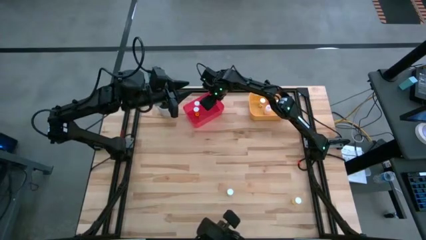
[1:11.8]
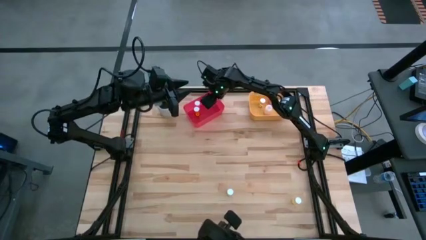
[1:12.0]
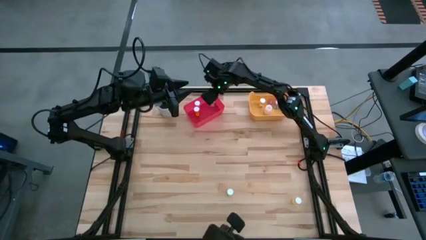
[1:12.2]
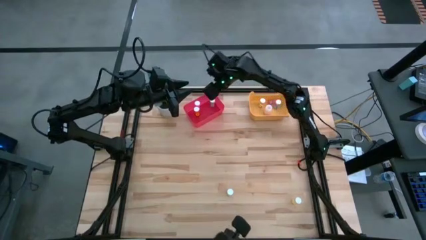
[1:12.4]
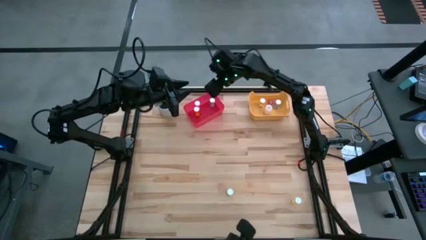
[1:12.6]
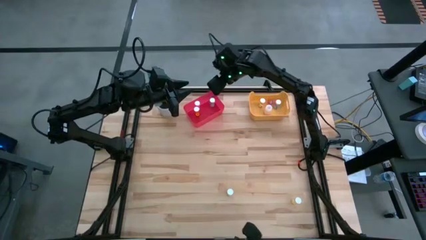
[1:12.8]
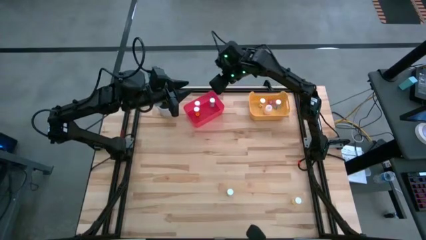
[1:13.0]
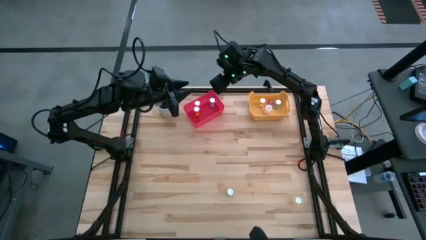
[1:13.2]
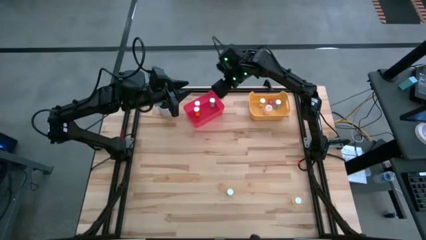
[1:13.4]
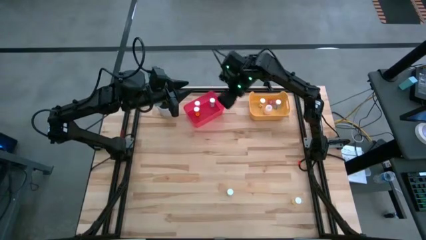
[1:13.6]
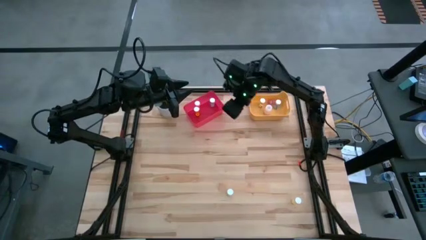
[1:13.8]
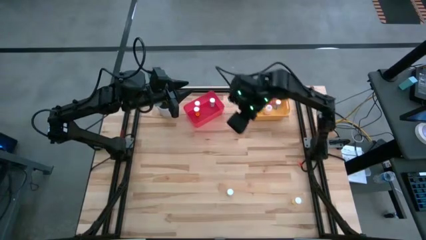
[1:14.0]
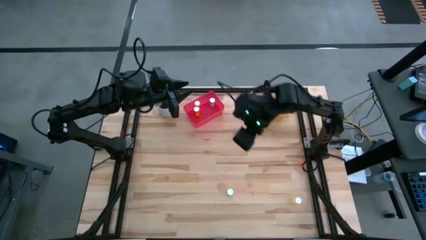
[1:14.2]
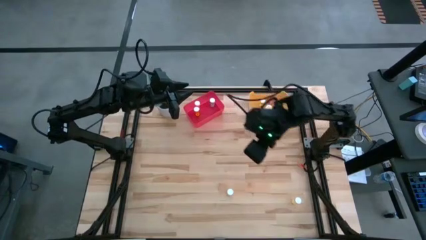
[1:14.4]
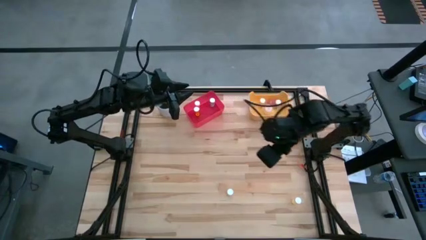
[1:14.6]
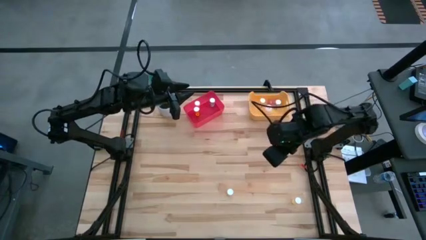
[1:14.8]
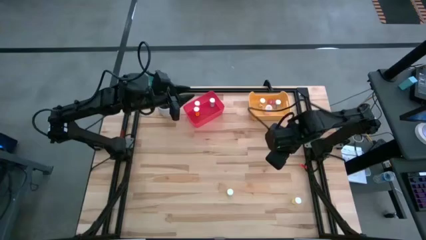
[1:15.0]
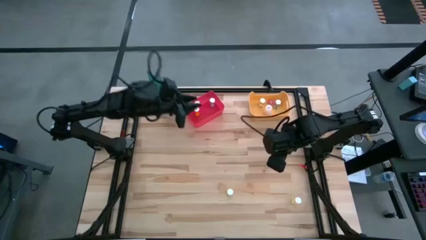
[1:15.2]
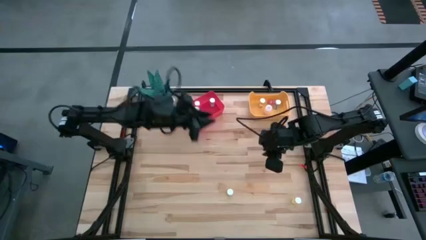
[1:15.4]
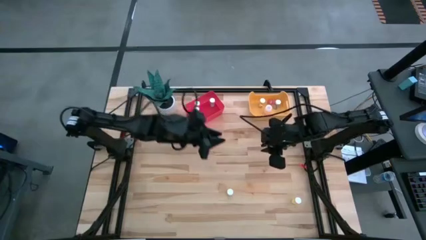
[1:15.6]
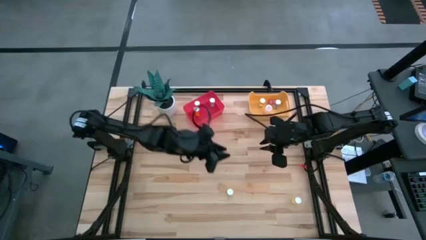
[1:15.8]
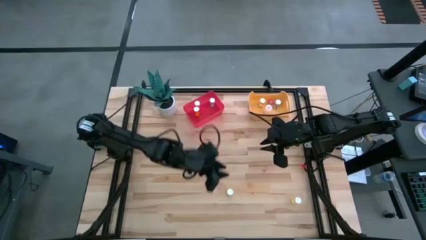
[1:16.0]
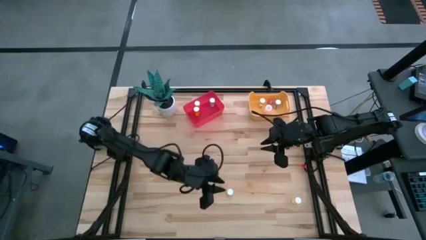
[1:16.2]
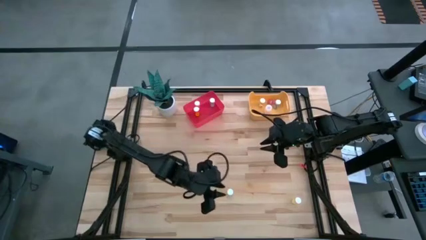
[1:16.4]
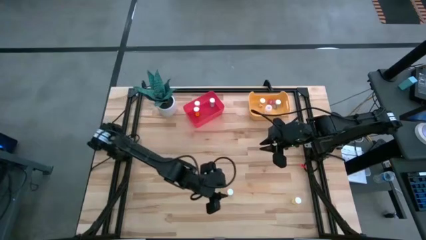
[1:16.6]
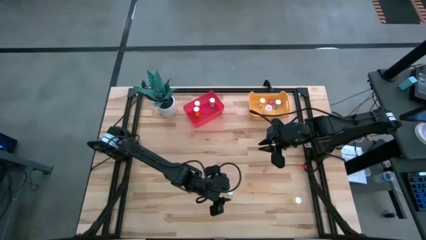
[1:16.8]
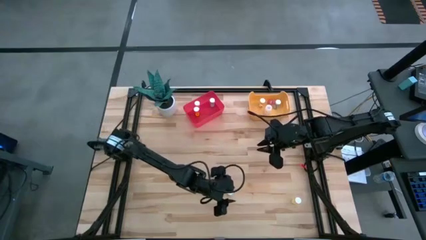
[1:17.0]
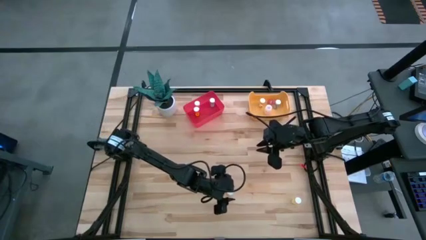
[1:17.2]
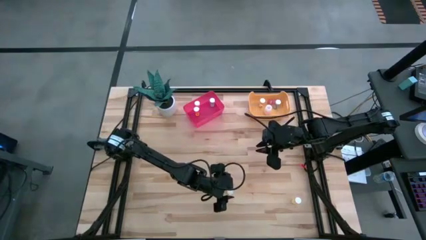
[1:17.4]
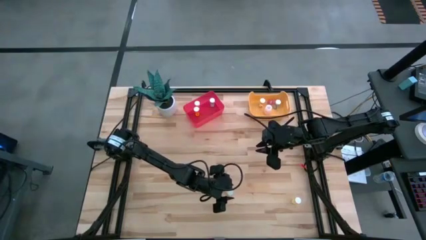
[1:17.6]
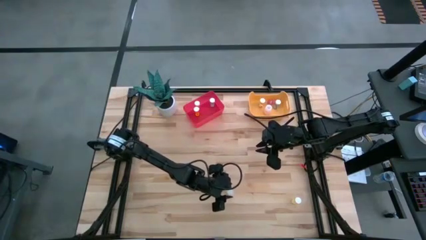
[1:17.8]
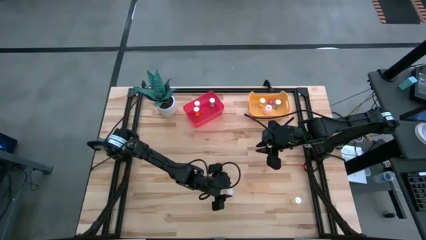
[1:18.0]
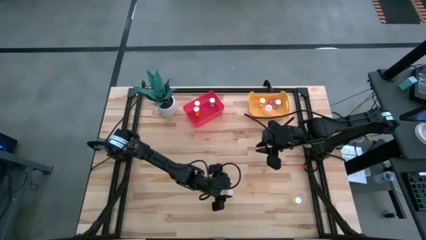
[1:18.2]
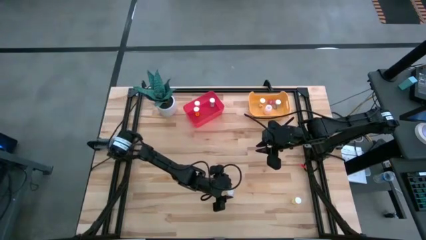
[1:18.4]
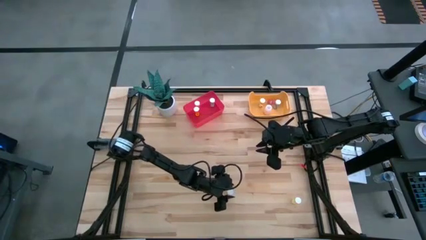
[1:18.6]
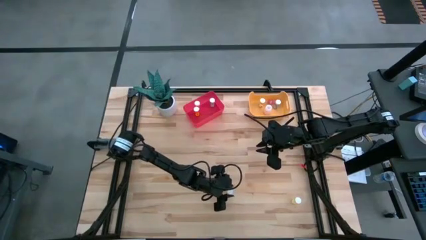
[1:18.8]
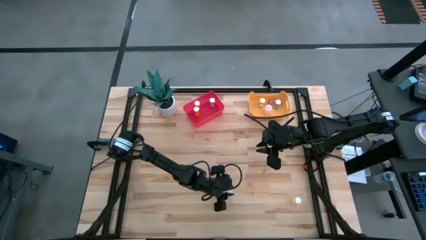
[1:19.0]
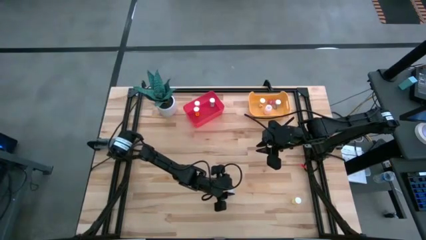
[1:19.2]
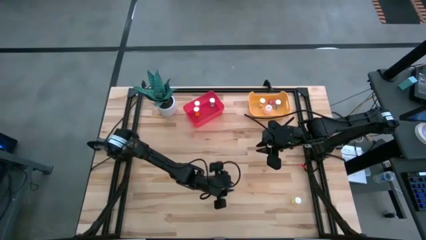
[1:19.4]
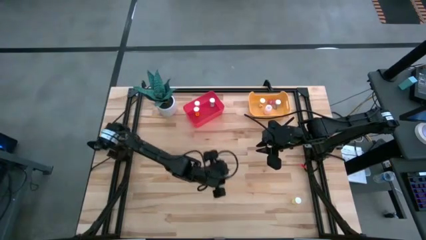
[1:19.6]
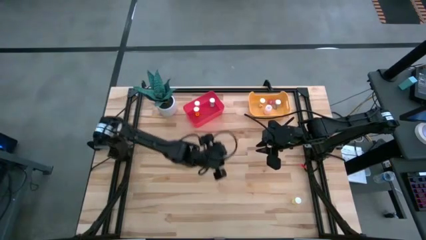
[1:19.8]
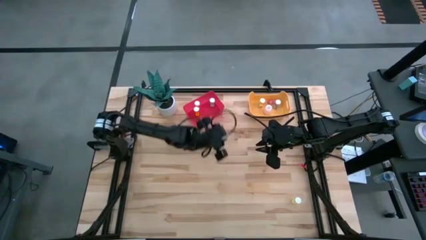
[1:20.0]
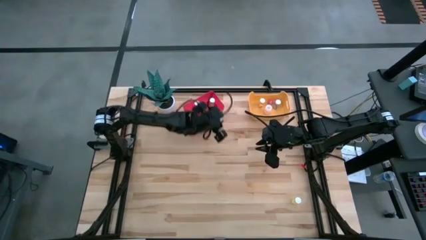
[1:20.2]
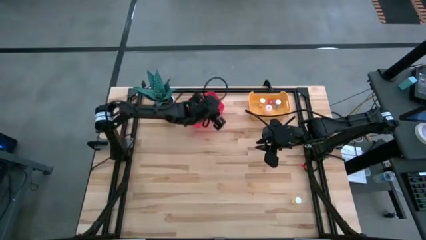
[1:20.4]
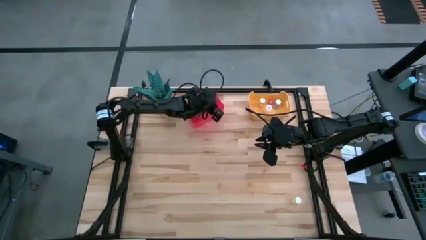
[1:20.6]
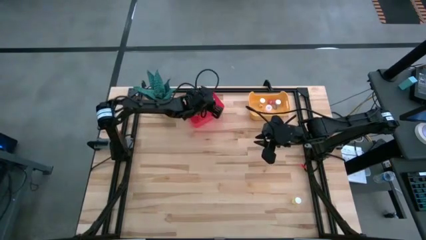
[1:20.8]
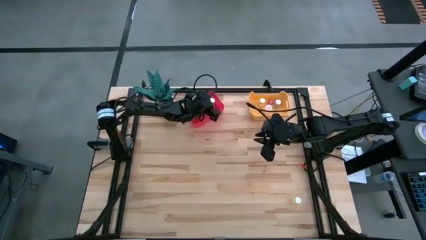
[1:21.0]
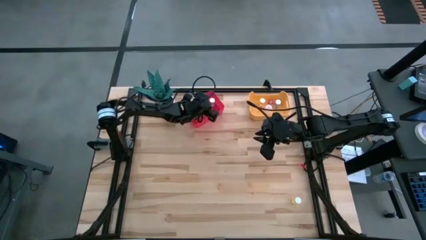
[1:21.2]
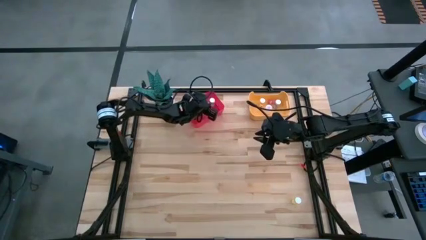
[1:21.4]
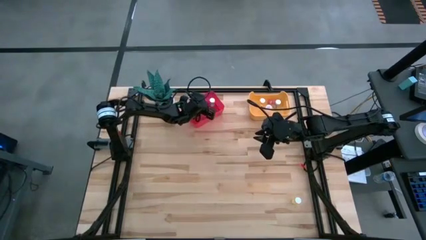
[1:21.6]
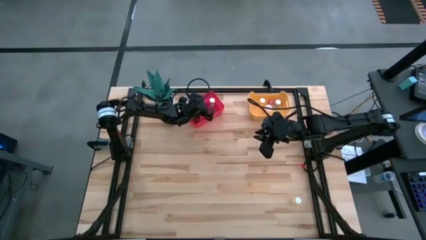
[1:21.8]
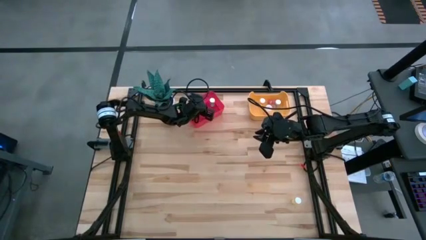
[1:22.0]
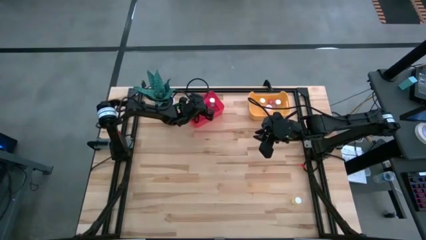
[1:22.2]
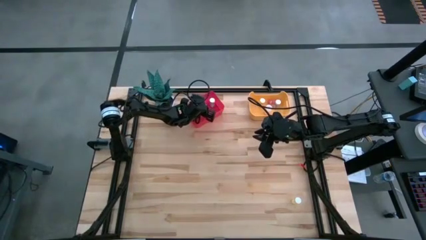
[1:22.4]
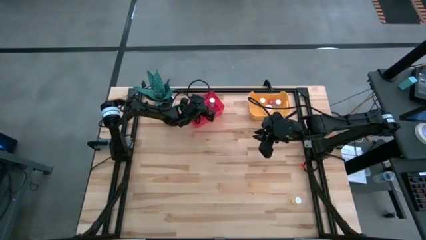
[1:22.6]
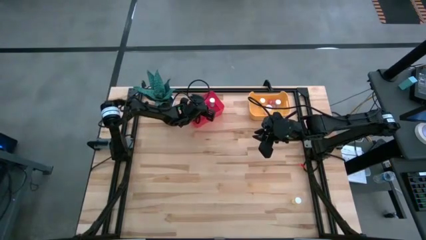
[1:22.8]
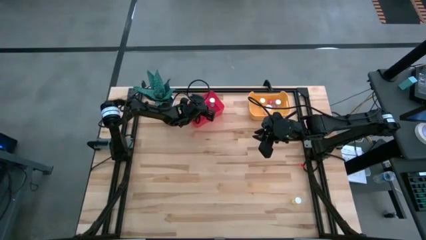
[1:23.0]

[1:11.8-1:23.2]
Task: Pick and place medicine bottles into bin by pill shape (circle, oval)
Put the left yellow tablet bottle into the pink bin

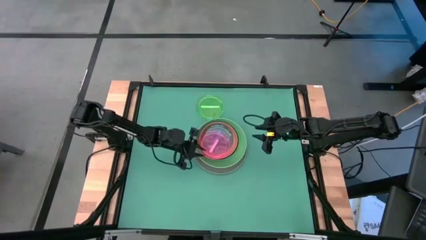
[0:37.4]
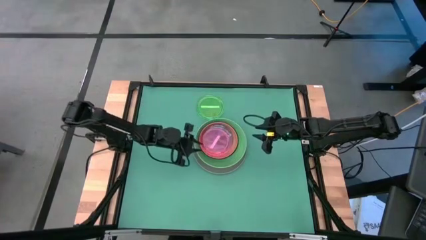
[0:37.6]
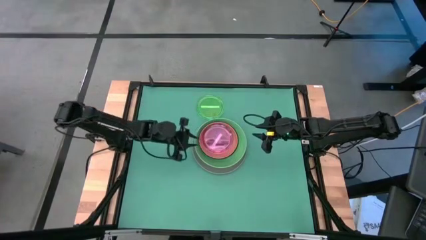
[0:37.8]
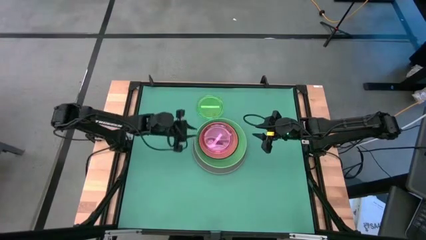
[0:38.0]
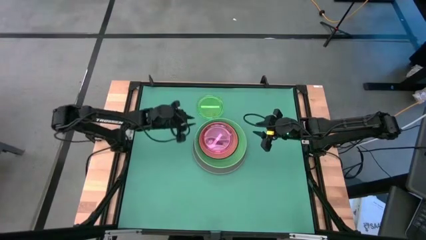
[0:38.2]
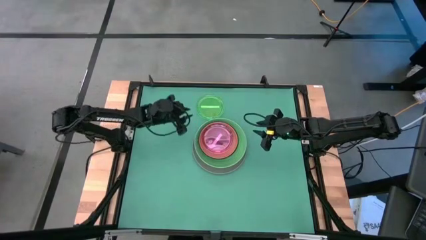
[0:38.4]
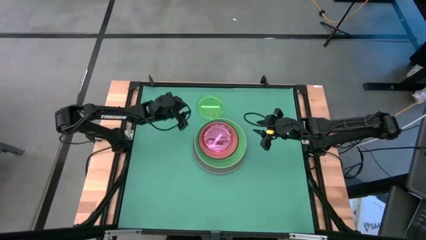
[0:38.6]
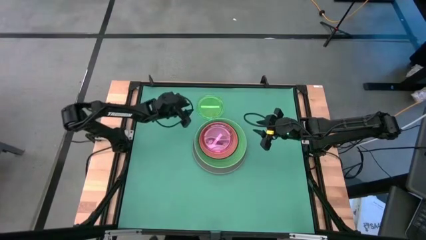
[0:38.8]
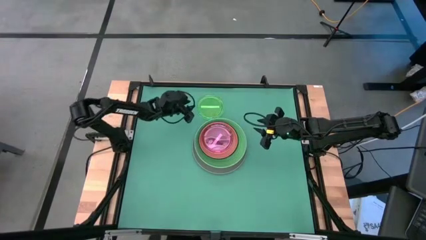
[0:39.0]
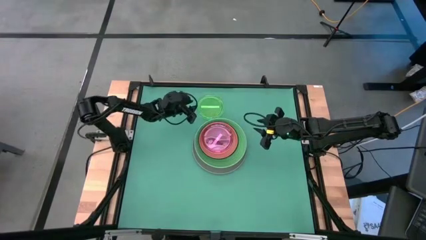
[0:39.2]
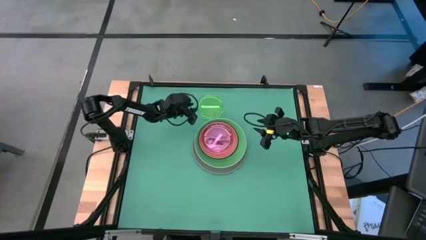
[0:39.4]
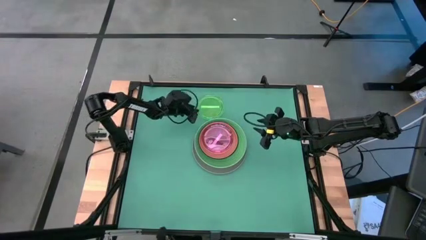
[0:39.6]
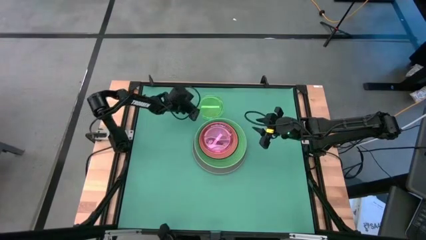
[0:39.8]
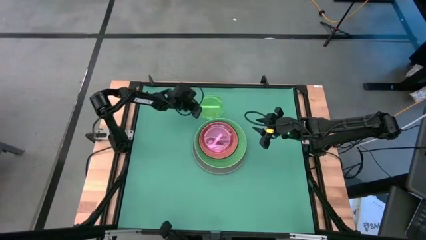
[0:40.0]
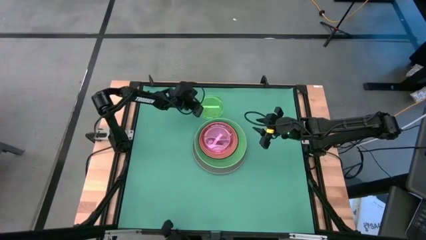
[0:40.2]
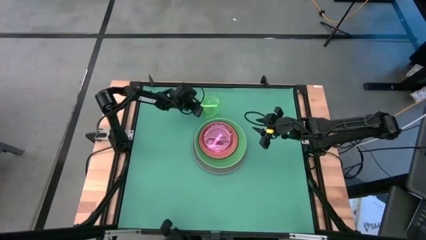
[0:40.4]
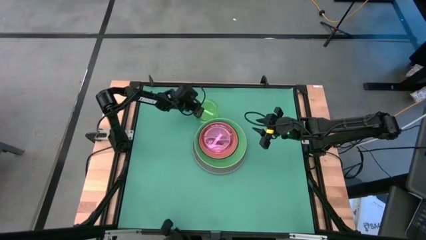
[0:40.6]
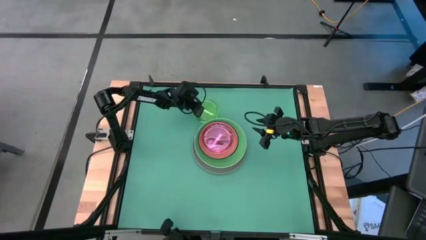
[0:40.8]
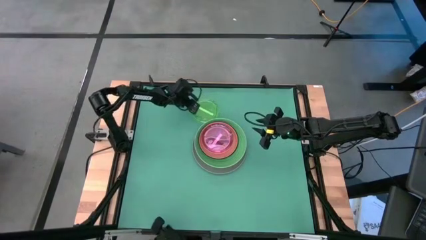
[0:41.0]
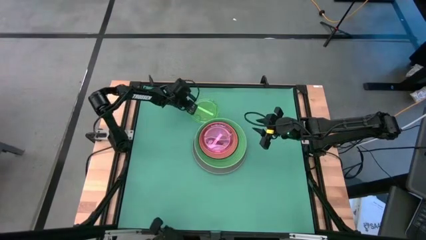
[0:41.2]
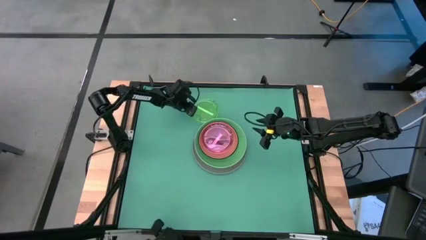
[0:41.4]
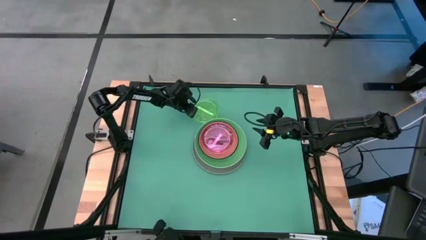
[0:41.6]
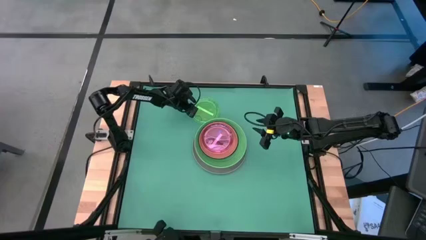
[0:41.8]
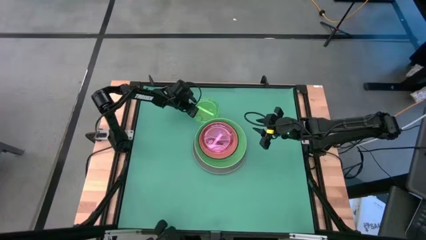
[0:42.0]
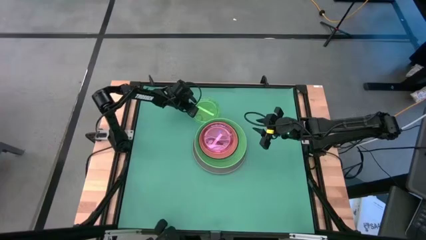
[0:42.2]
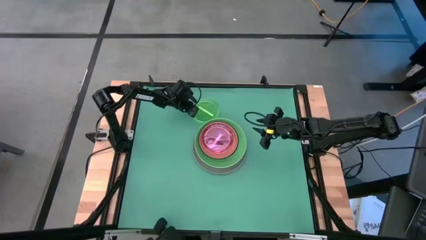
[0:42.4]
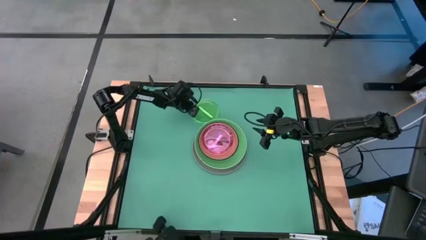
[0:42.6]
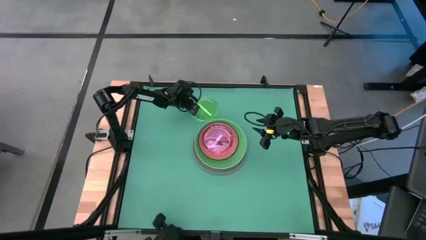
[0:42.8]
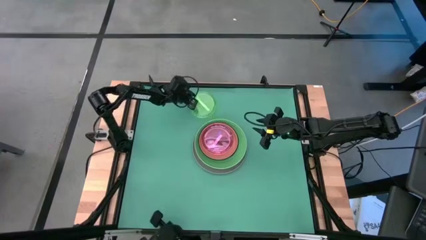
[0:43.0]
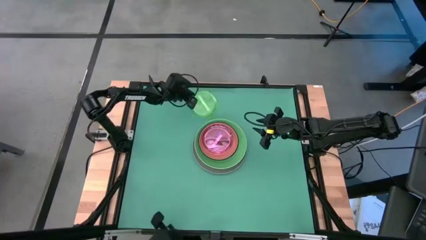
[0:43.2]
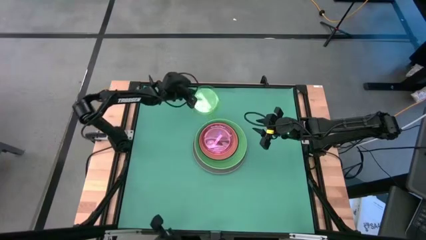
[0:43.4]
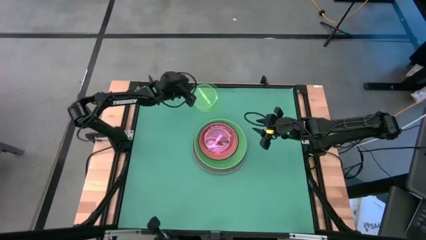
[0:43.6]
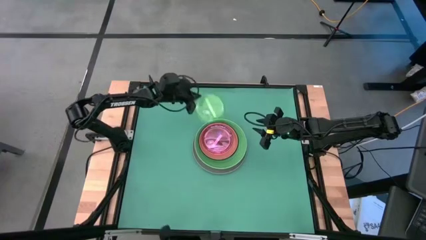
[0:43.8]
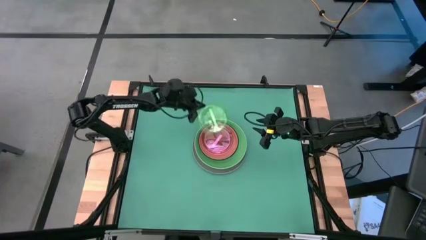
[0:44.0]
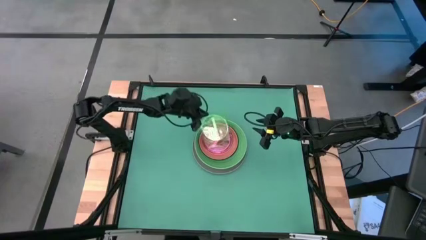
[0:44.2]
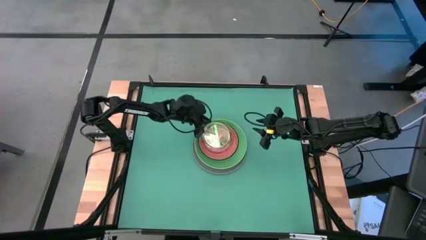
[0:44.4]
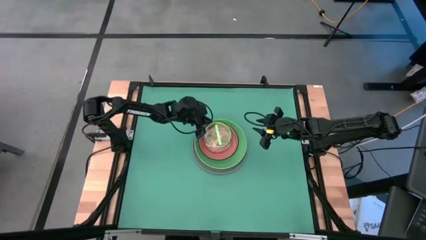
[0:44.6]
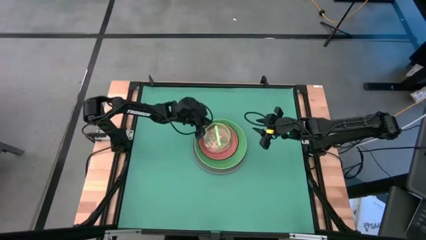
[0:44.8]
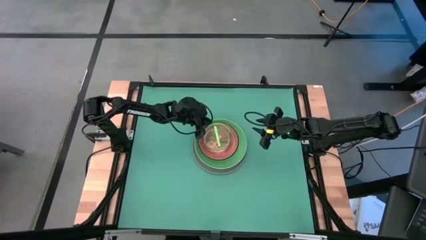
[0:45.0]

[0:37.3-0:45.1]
Task: Stack plastic plates
Stack the green plate on top of the pink plate
